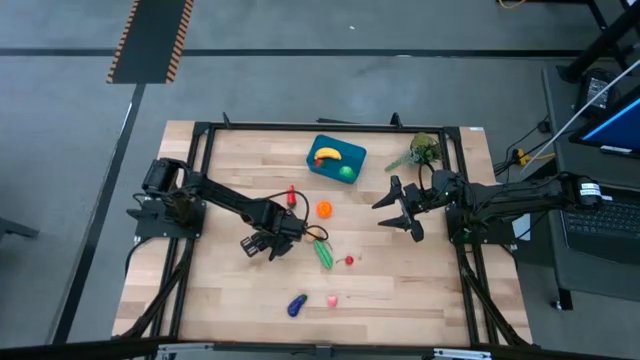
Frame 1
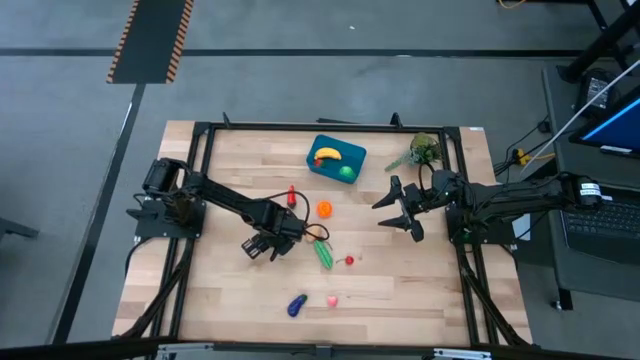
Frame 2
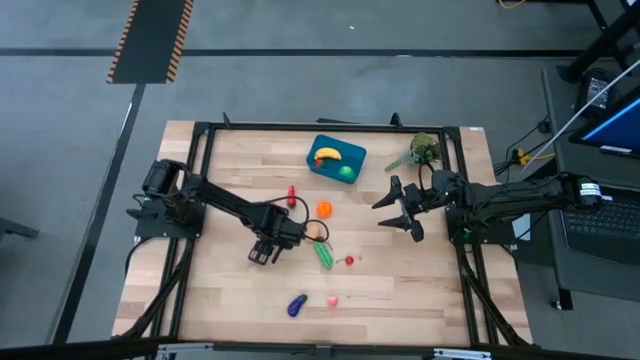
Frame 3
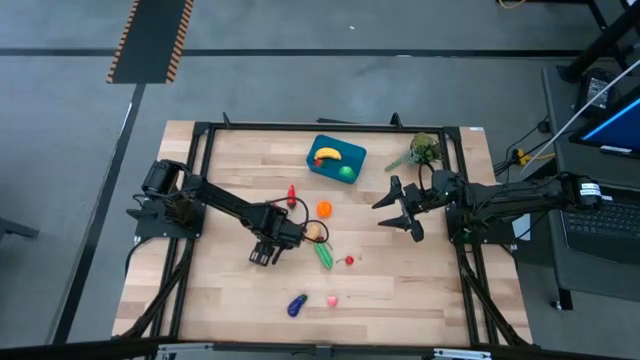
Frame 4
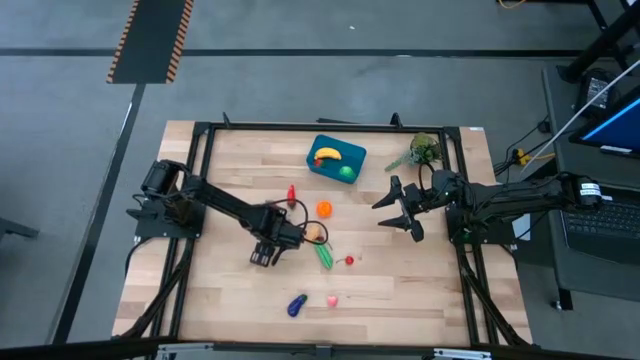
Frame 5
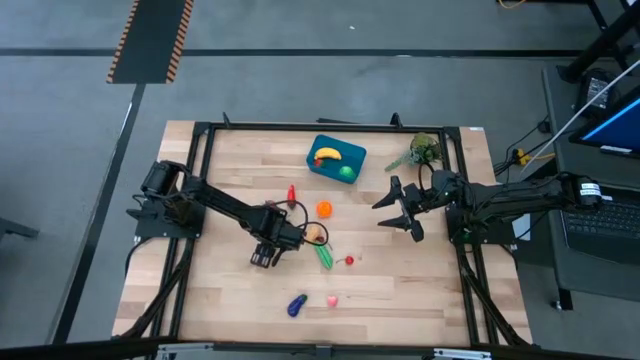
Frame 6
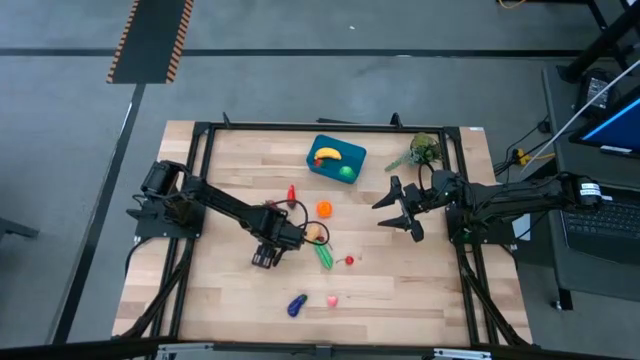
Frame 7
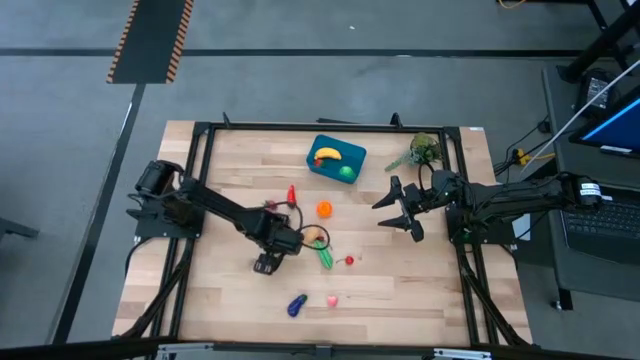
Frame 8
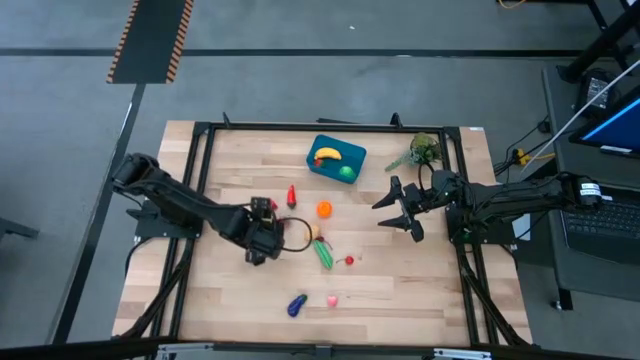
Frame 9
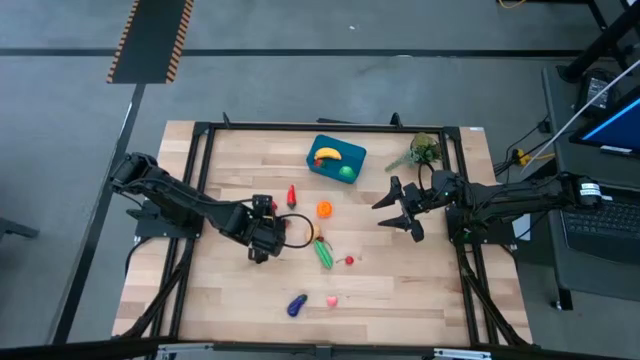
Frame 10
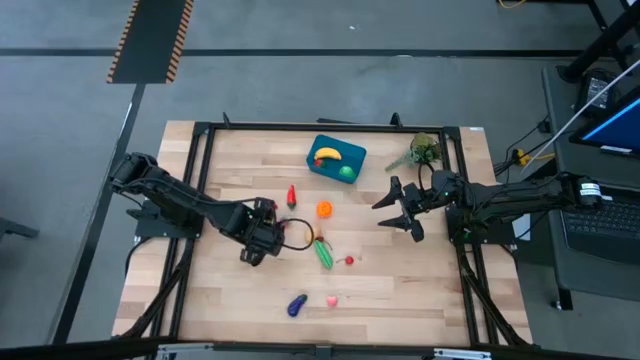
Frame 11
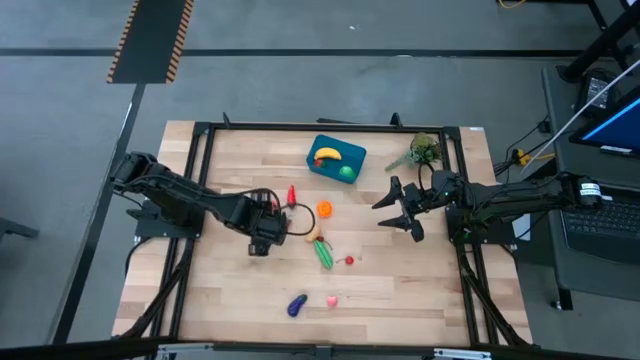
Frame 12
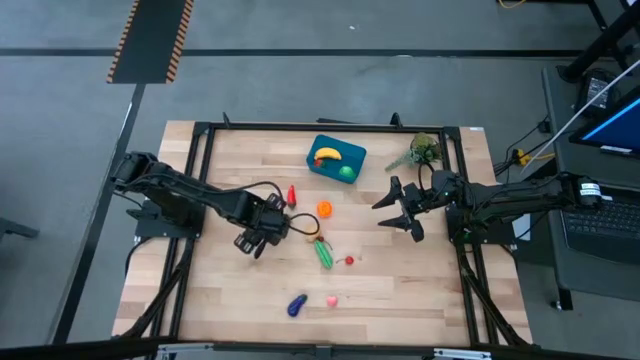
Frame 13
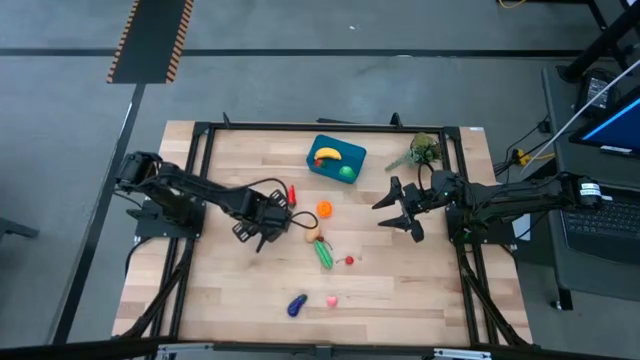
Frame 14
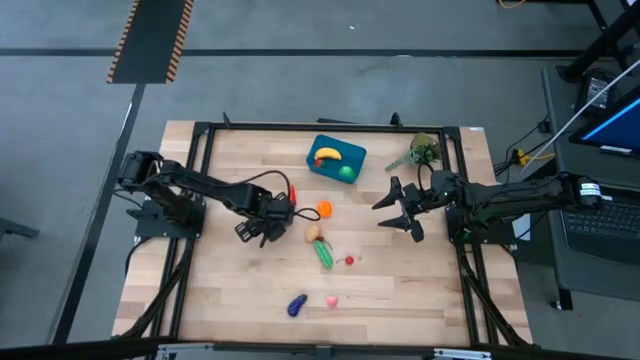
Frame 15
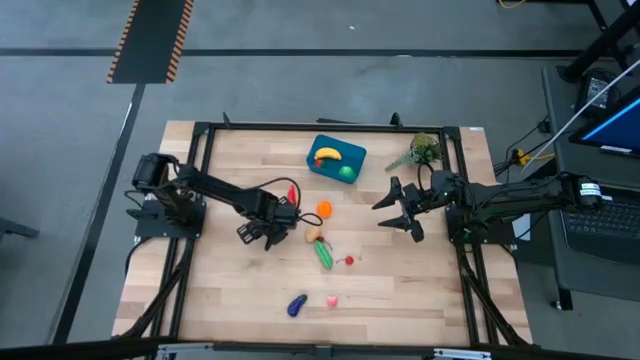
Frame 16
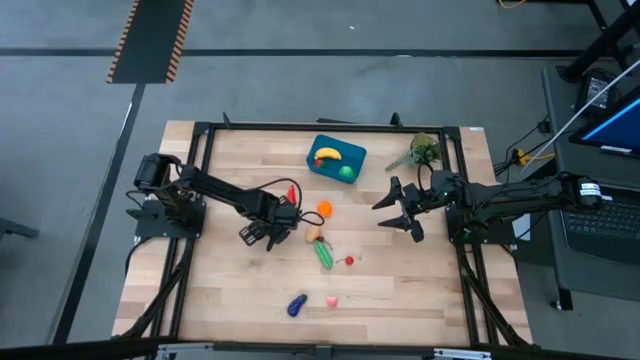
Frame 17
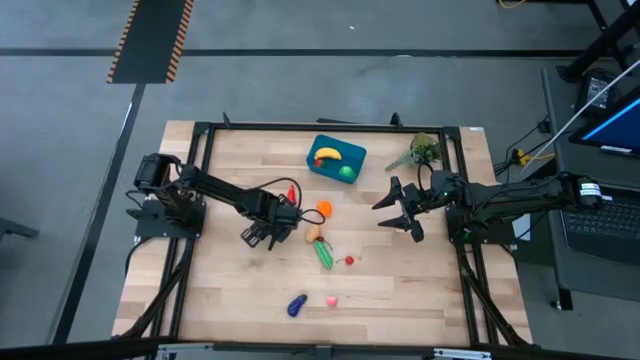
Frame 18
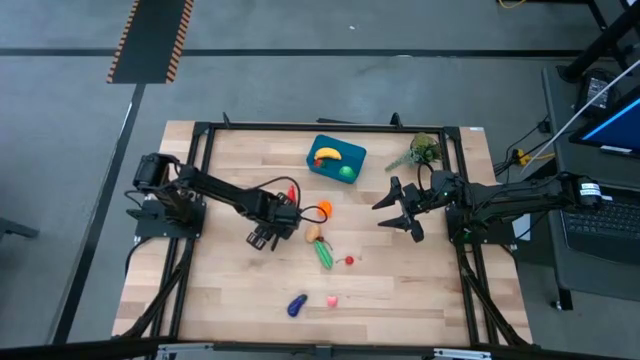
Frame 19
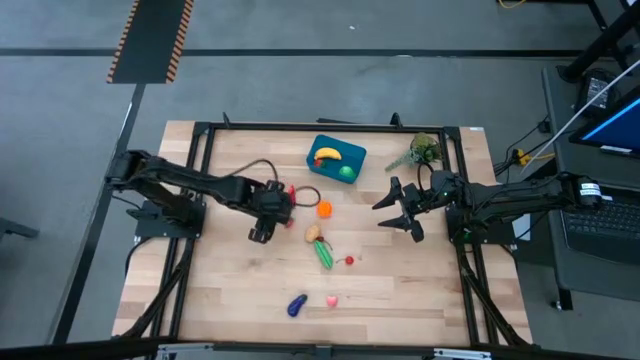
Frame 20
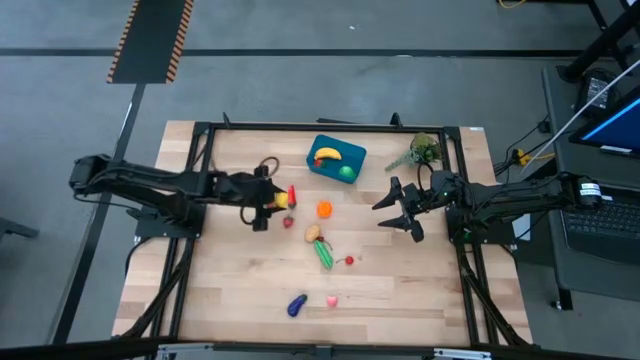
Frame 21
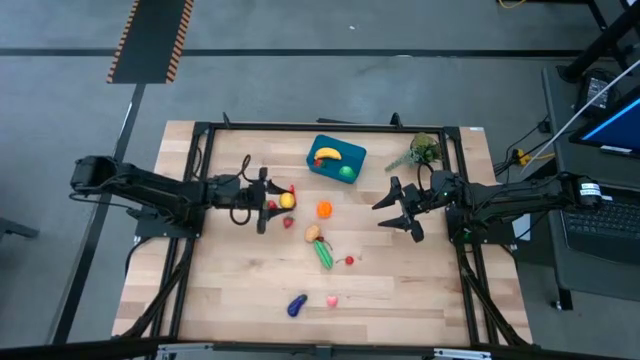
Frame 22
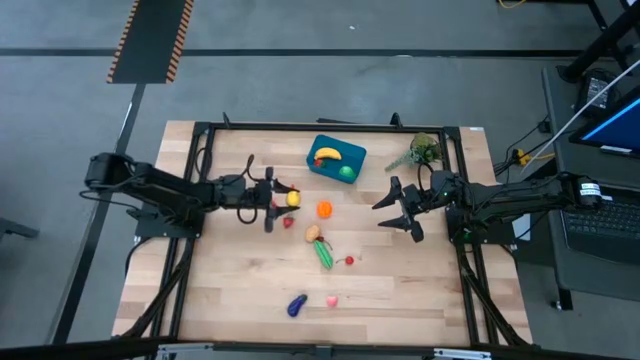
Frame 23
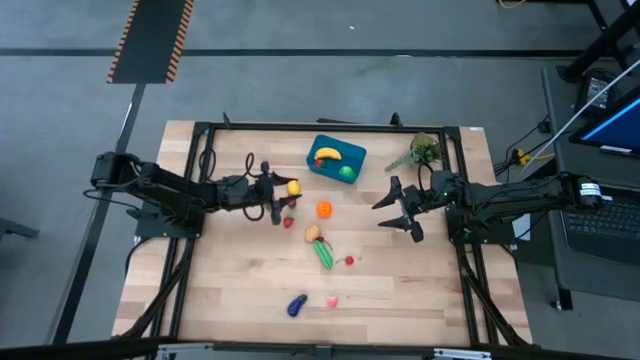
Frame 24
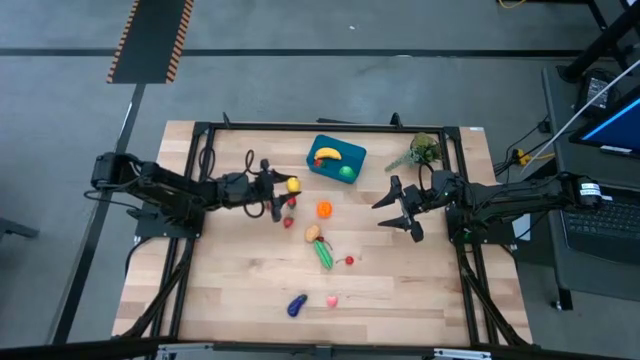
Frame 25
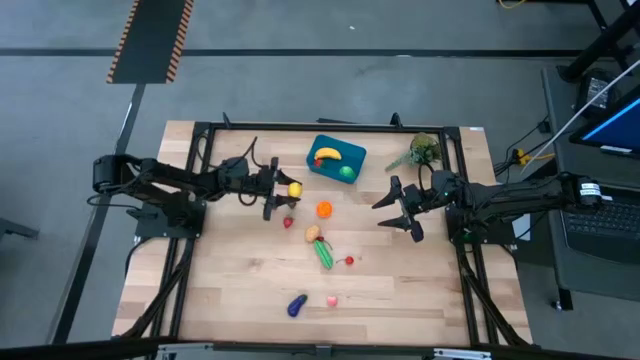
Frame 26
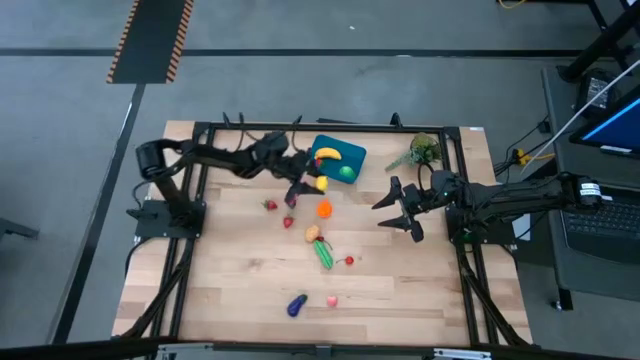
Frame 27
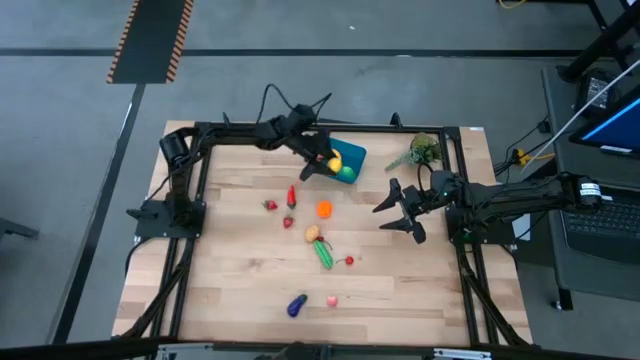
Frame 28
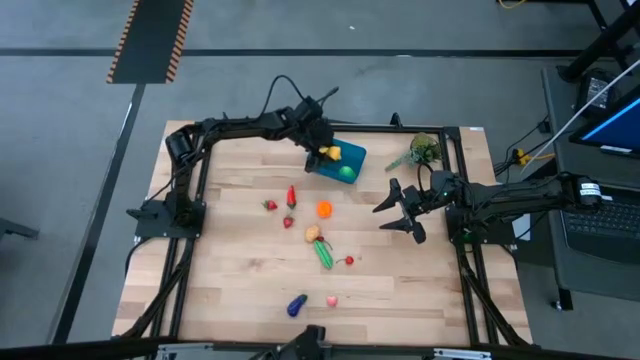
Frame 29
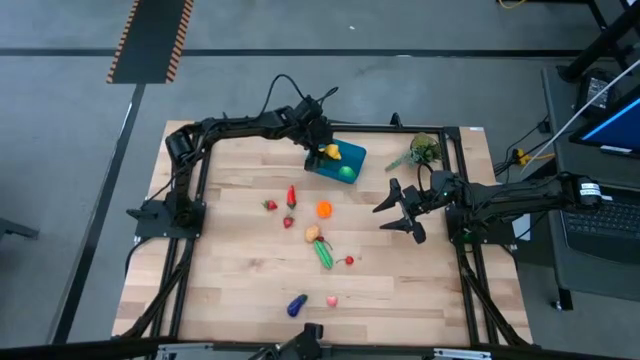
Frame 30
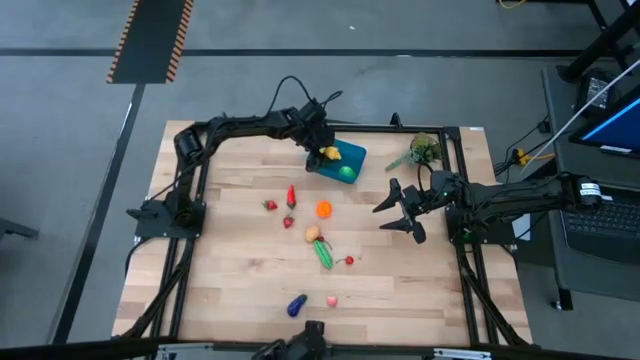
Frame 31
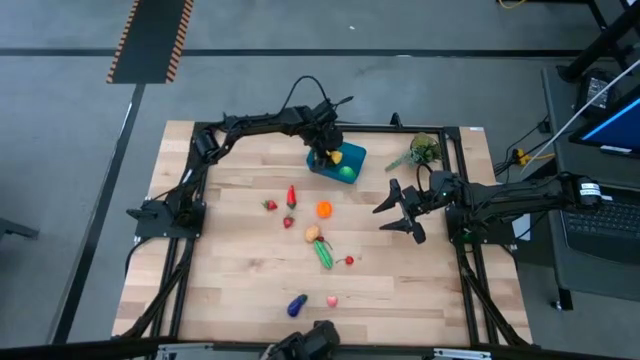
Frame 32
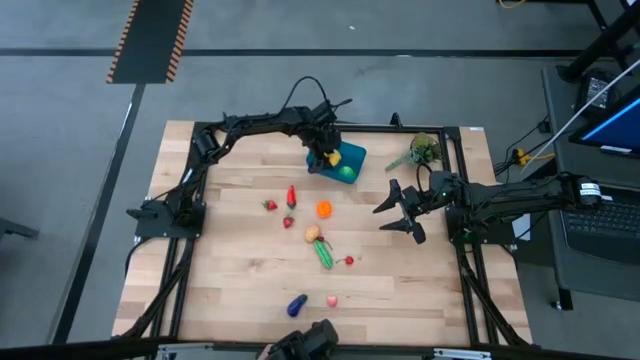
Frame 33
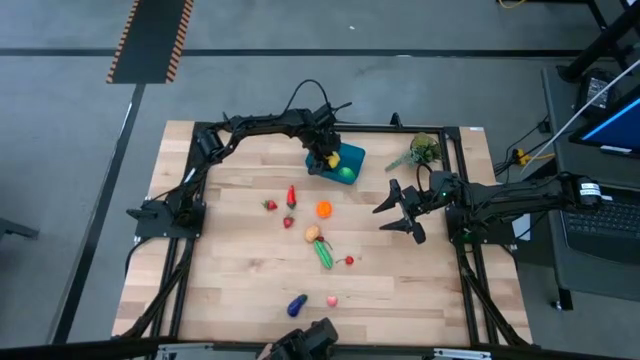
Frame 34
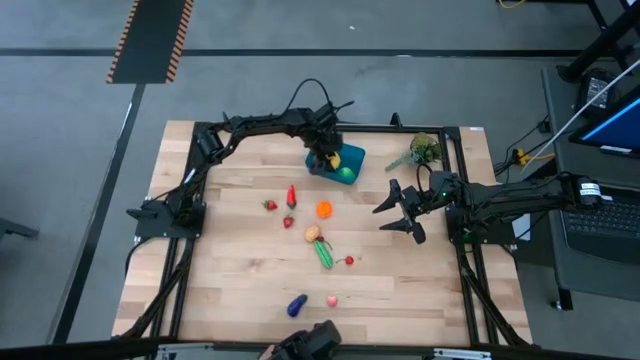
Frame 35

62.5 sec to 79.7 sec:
Task: Pick and placing Produce into tupperware
Put the yellow lemon into the blue bin
